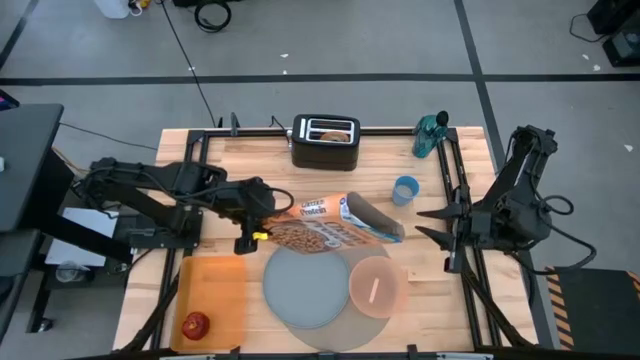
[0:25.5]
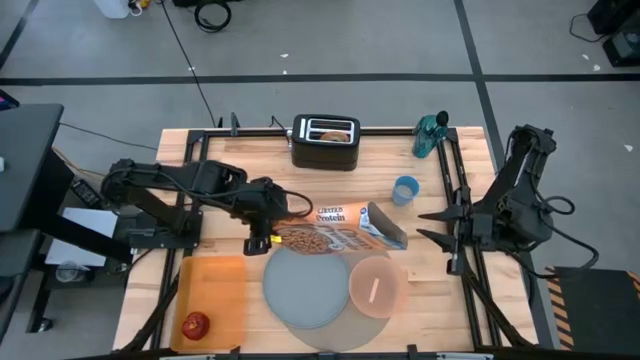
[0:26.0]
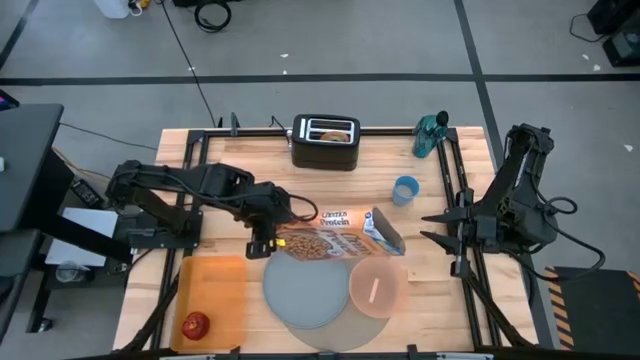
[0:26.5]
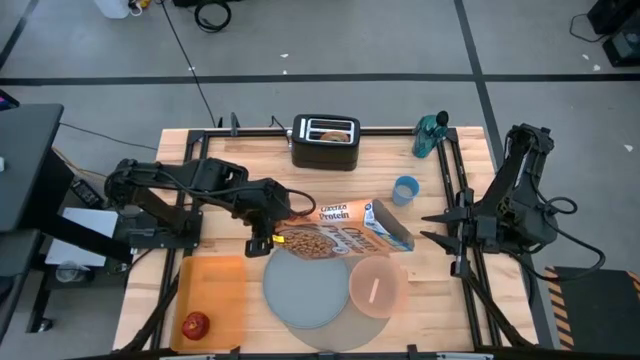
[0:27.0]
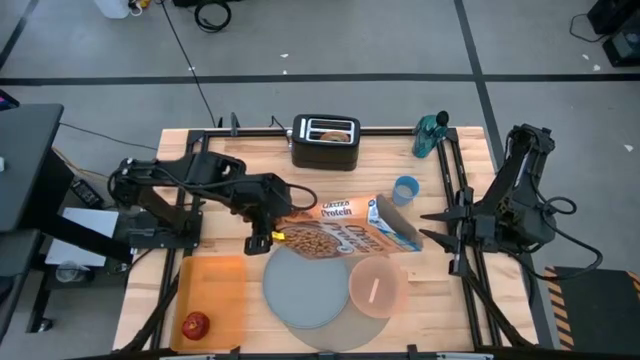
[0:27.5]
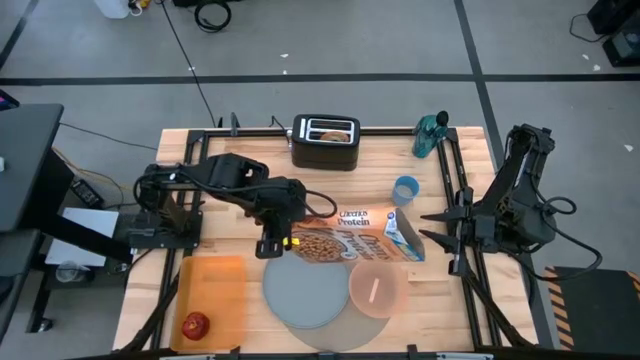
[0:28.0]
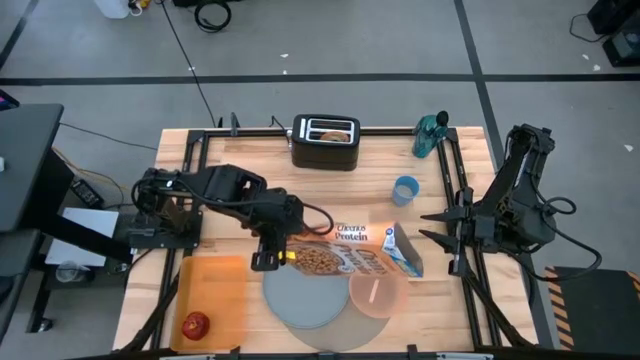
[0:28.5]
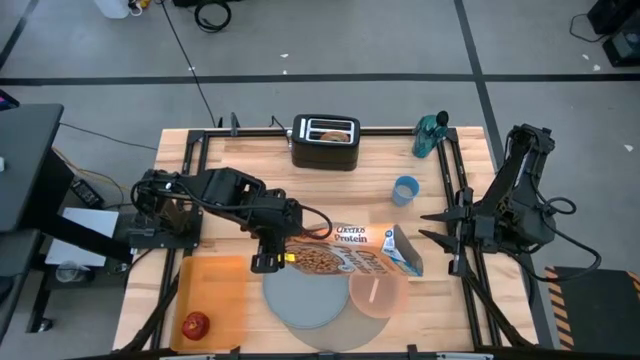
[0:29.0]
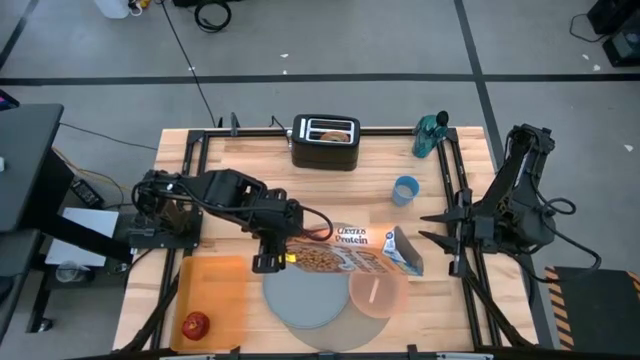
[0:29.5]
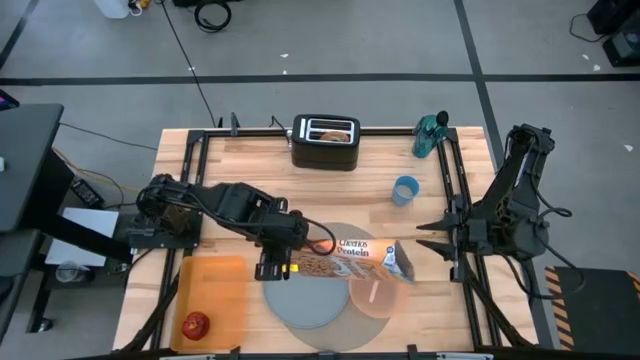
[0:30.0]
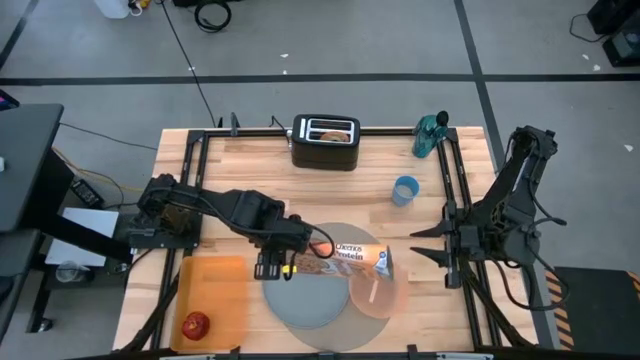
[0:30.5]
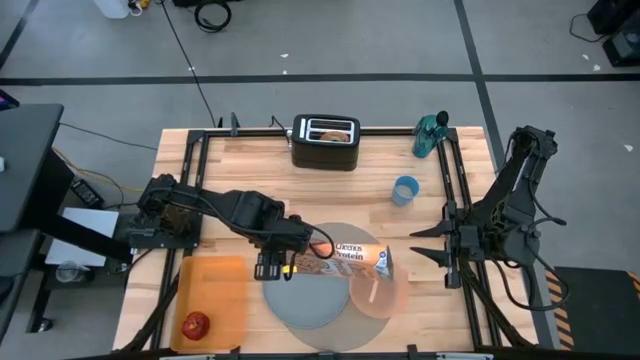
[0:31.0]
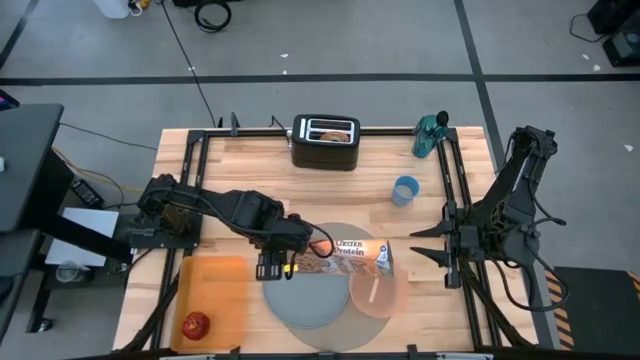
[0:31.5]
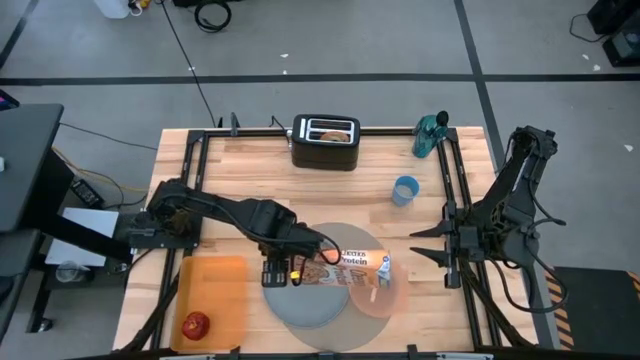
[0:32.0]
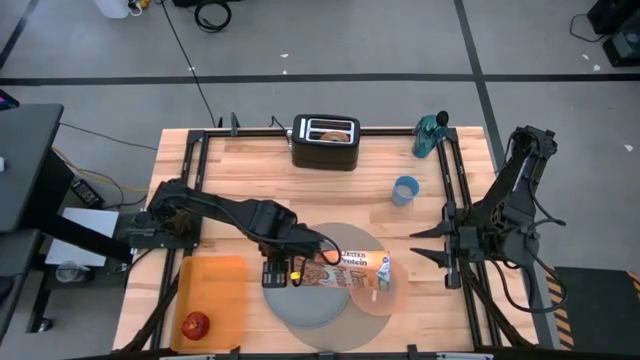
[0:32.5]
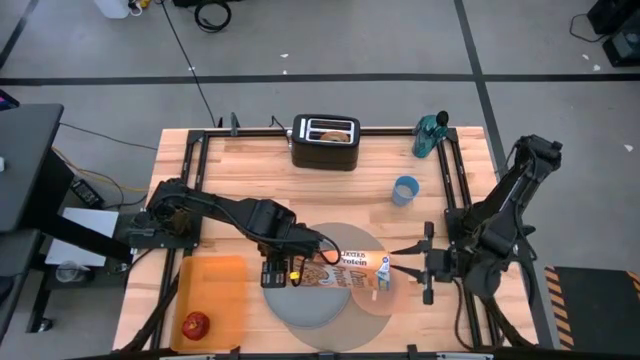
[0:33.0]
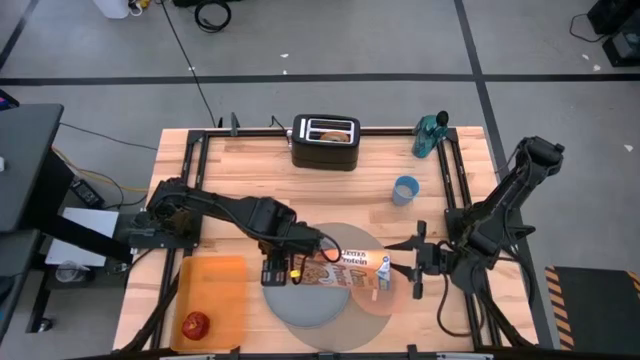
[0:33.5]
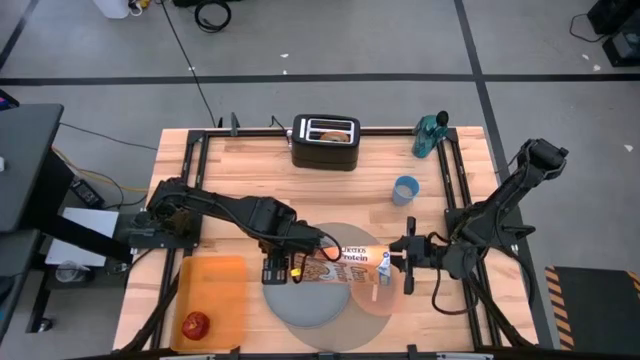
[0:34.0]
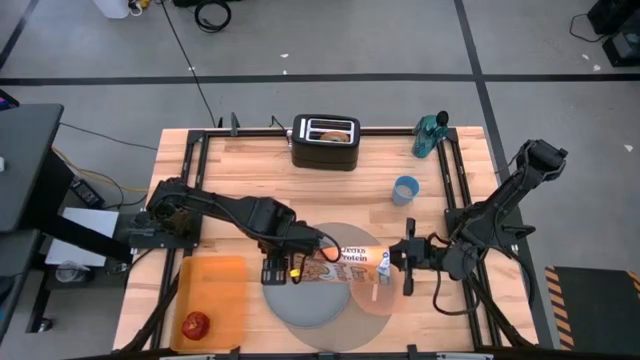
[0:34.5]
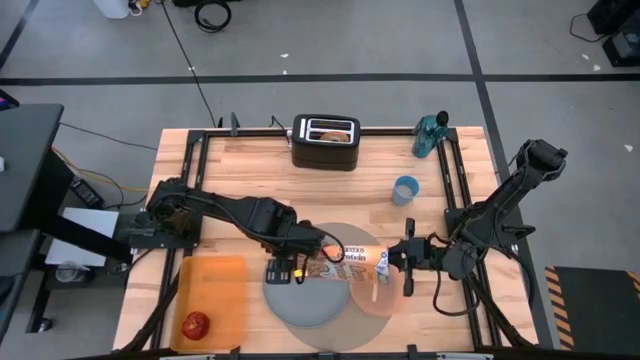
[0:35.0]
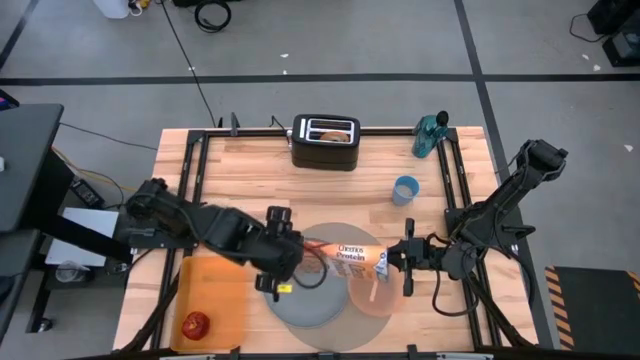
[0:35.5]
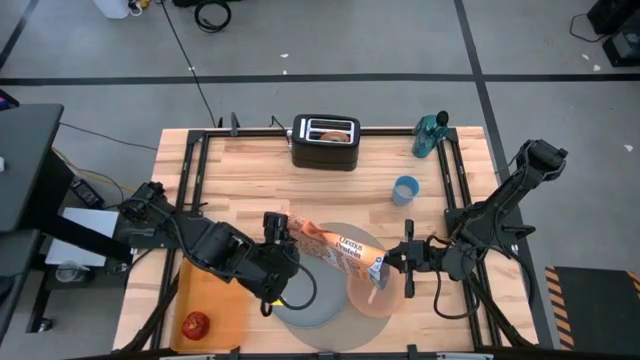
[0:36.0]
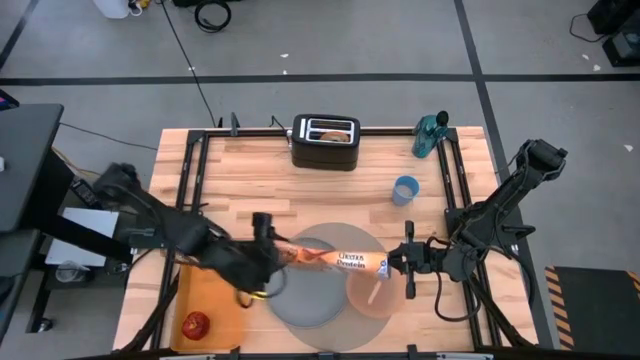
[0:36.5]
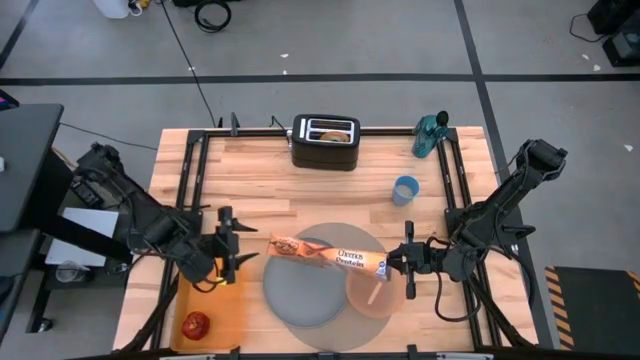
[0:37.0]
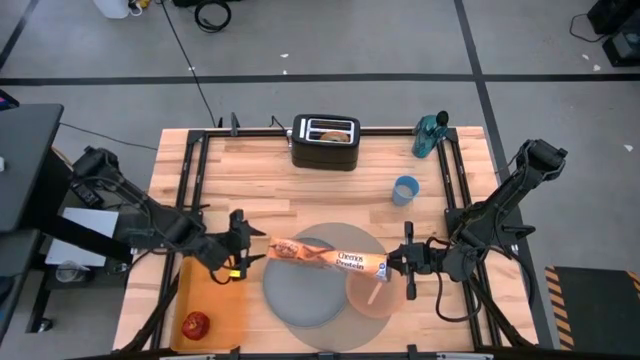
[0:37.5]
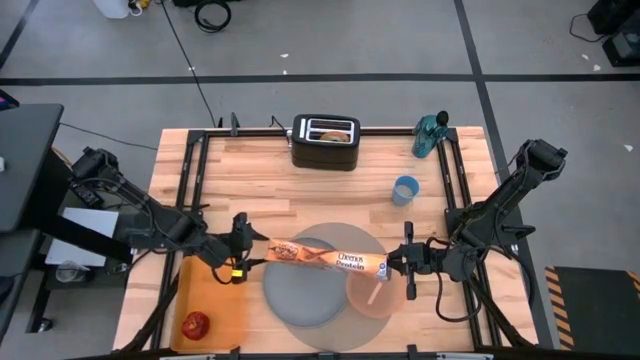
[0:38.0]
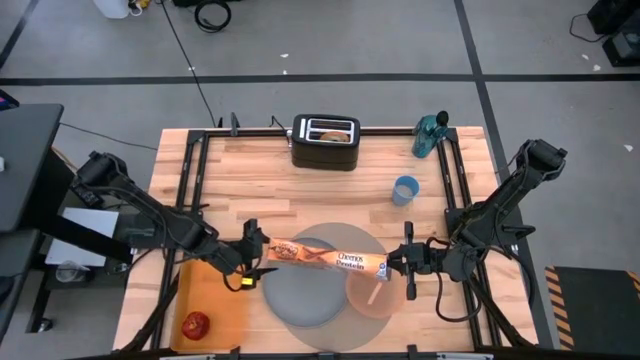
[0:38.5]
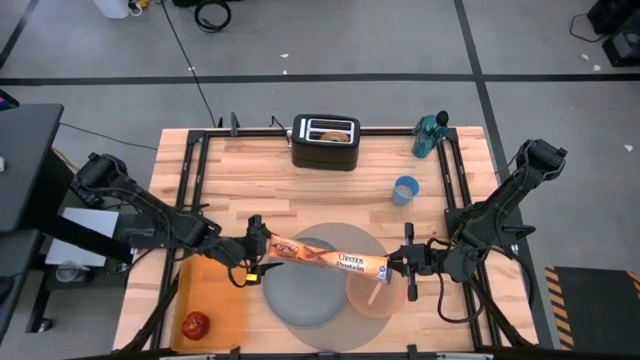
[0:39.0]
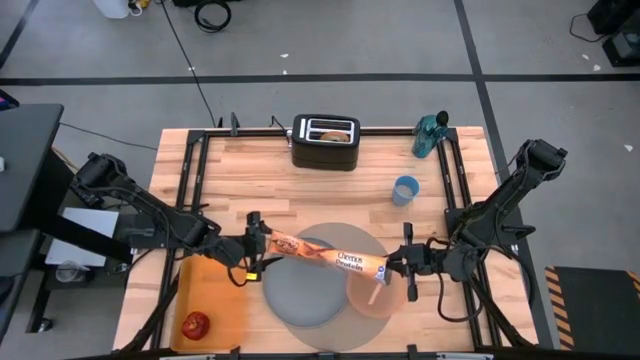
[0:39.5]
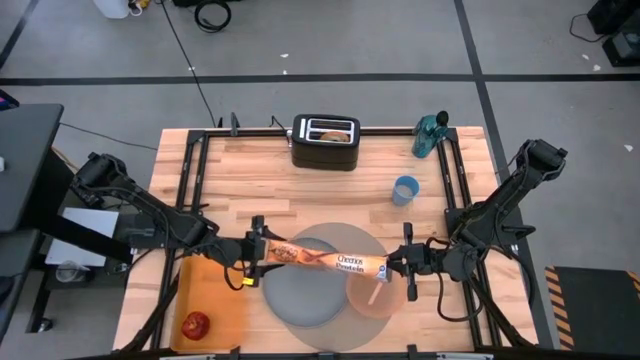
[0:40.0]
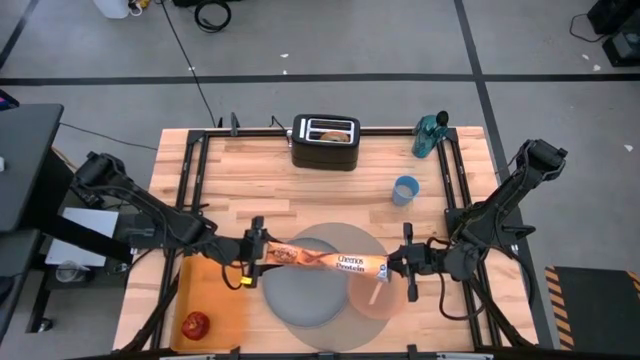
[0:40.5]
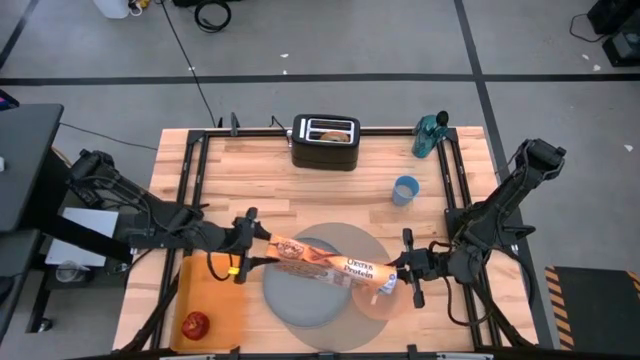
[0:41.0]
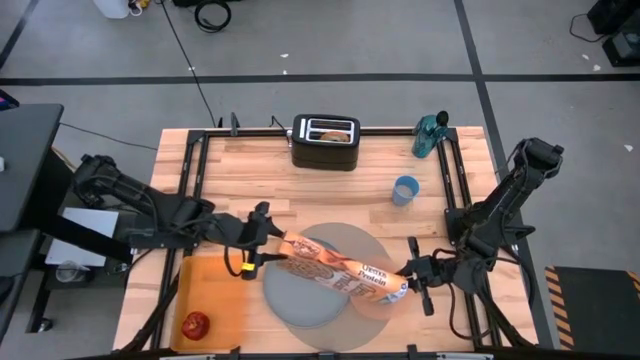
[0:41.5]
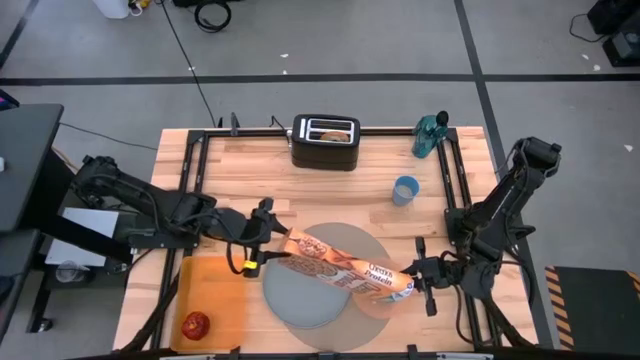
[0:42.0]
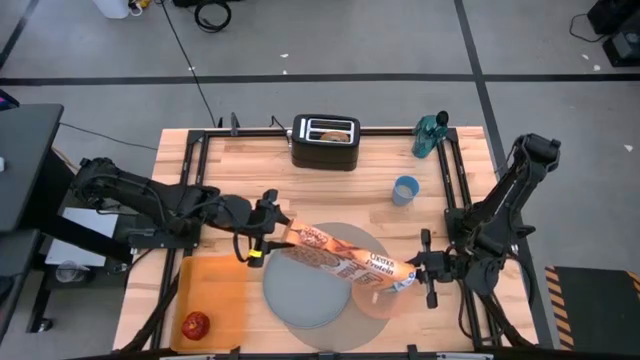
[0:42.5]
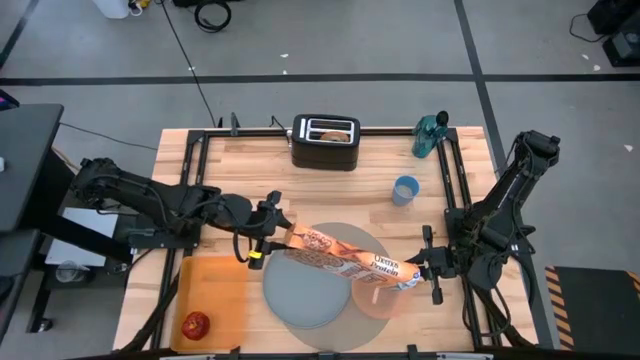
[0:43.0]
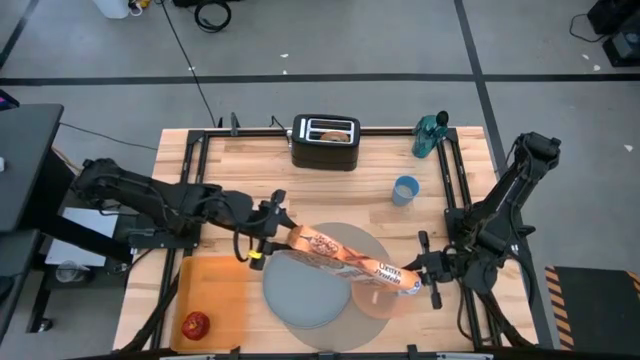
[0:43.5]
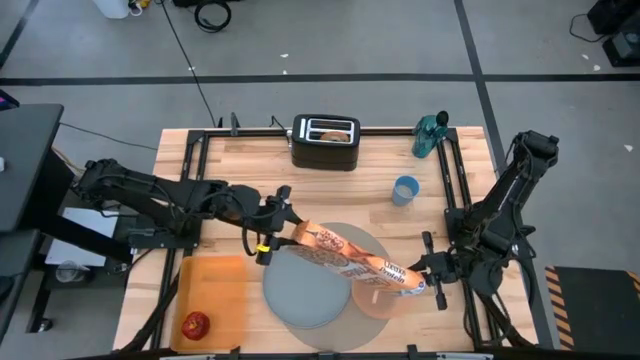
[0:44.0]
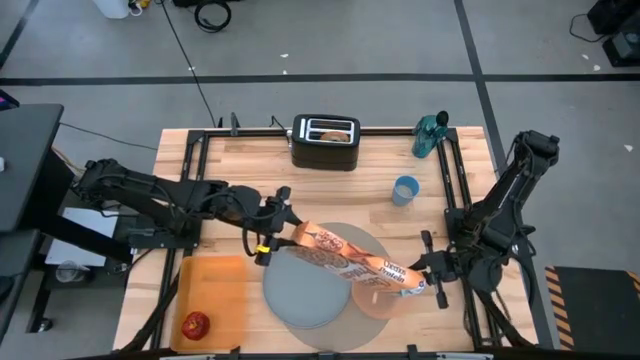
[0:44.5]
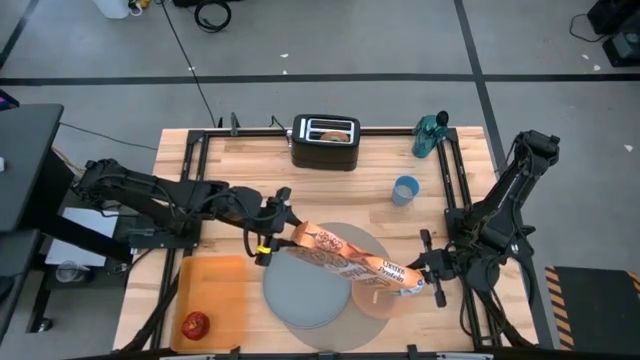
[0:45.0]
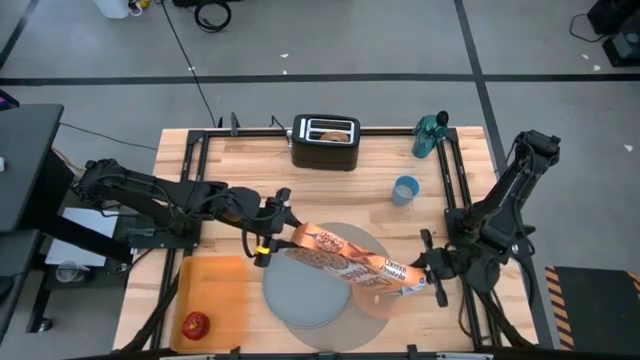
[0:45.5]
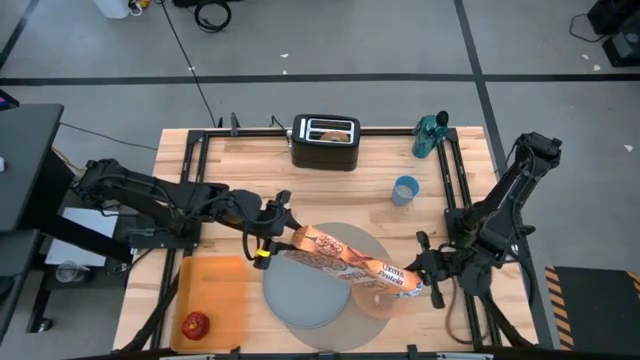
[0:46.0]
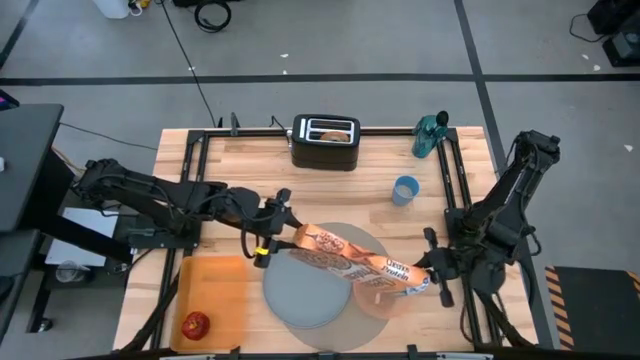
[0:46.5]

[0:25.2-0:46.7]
Task: Arrange a breakfast setting
Put cereal into the pink bowl
